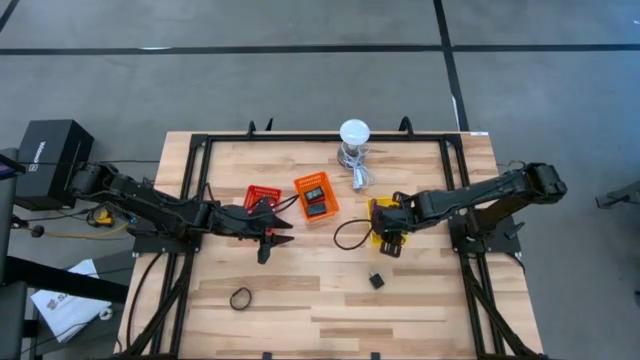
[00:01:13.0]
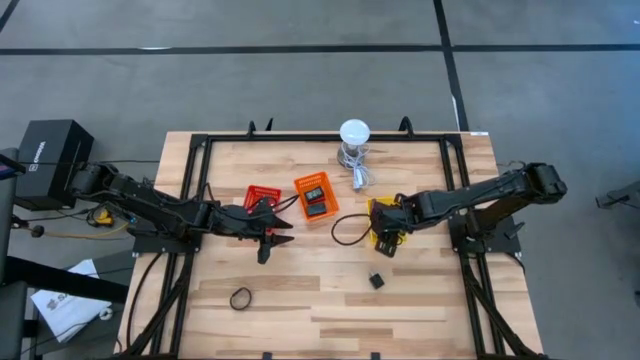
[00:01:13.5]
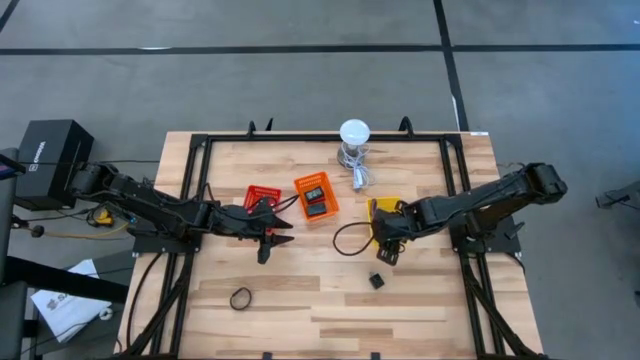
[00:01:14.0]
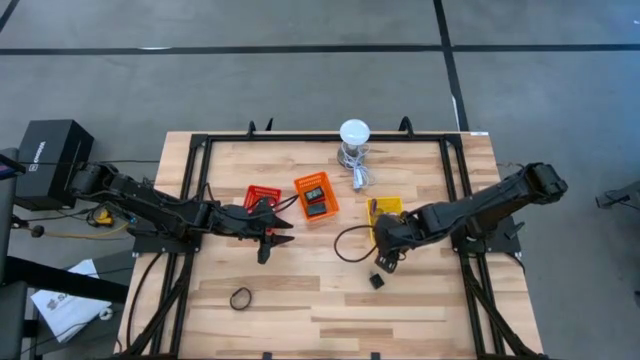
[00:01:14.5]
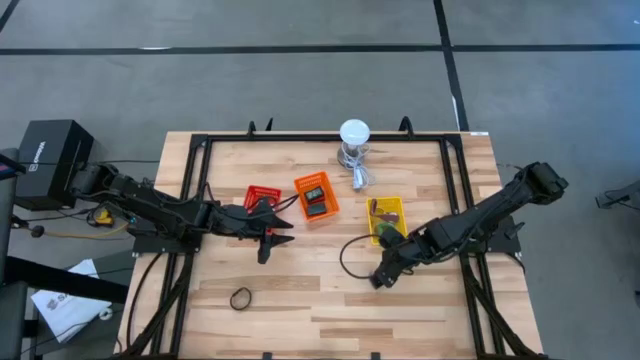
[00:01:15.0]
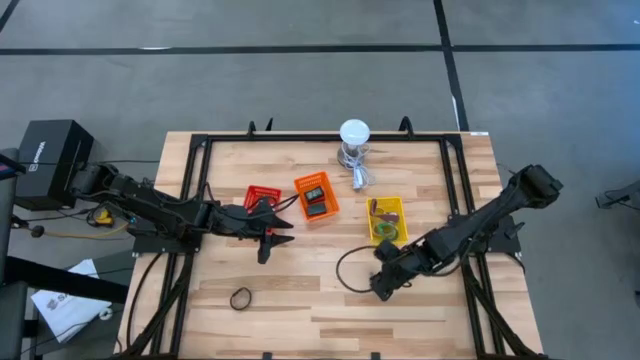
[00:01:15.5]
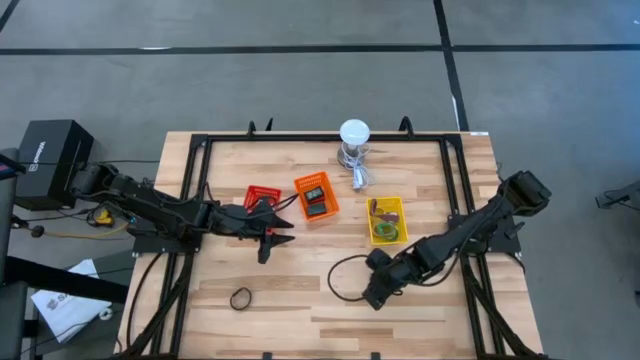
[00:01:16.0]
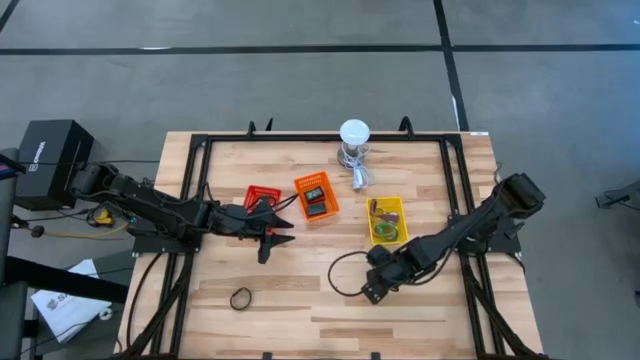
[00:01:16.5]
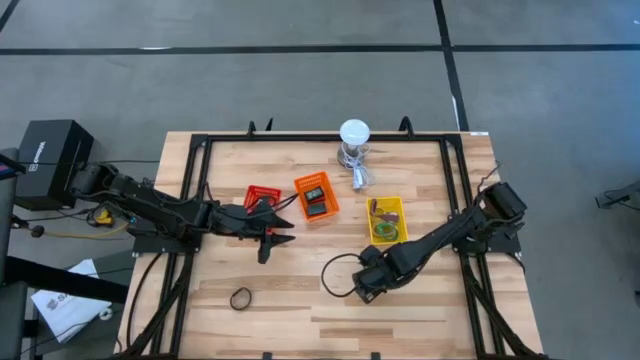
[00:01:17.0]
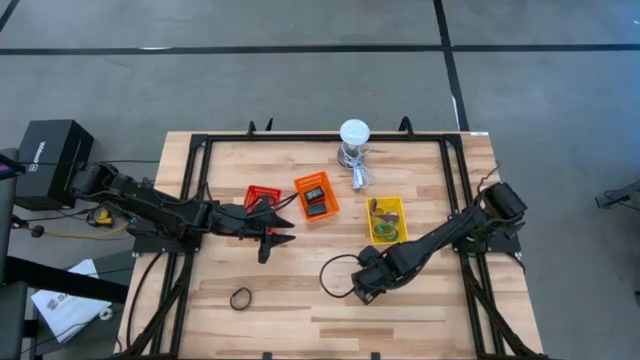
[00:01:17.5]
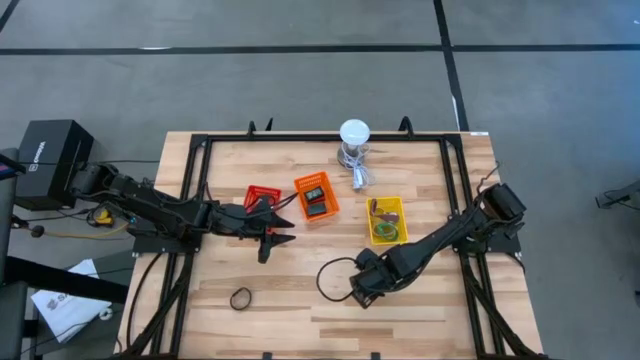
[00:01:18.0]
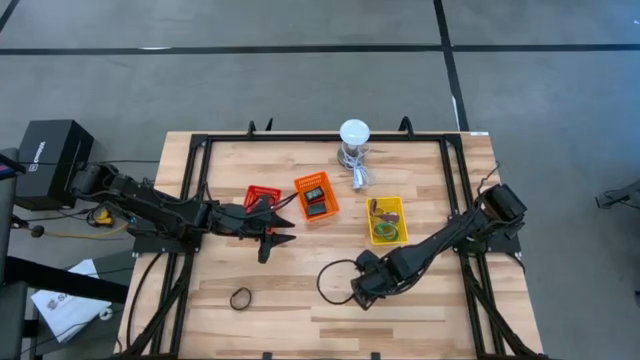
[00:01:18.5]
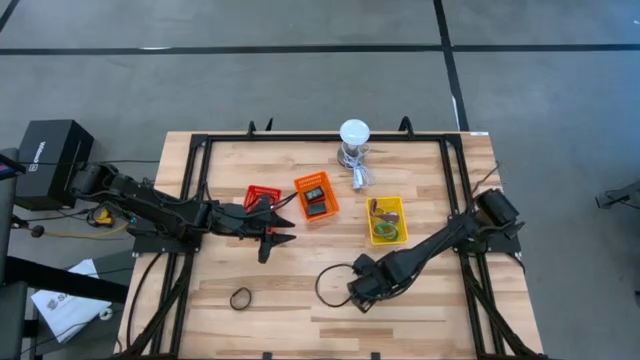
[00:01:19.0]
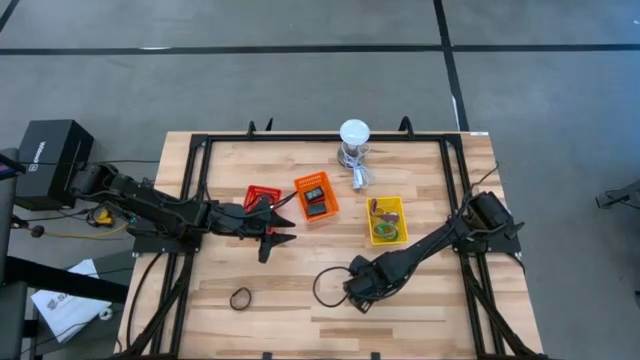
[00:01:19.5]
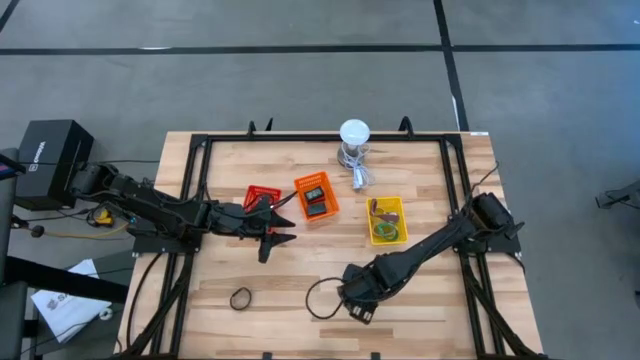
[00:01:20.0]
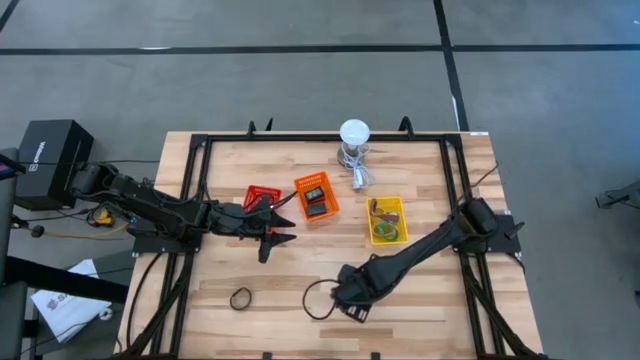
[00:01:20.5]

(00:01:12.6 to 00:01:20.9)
Task: Pick & Place Office items
Put the black charger adapter into the red bin

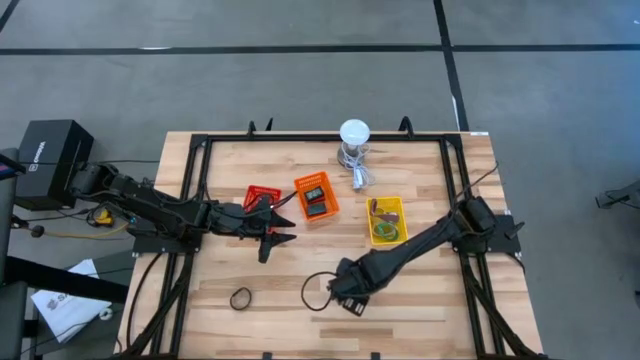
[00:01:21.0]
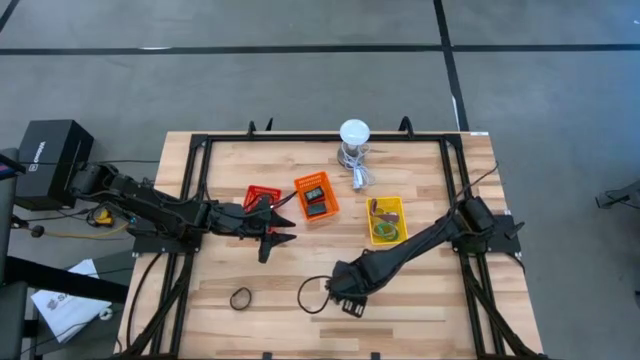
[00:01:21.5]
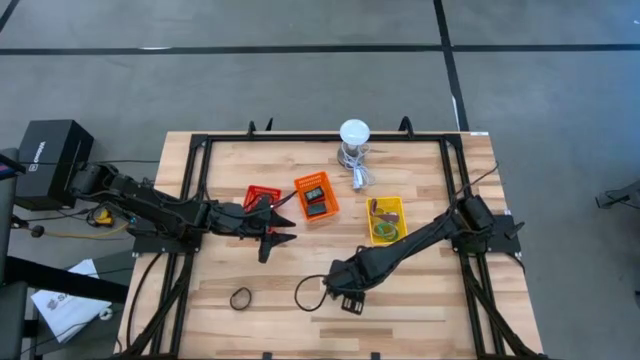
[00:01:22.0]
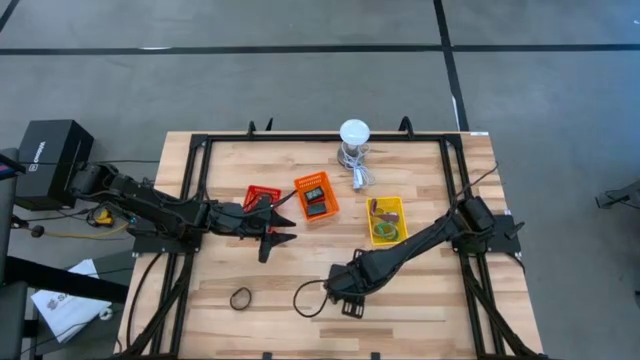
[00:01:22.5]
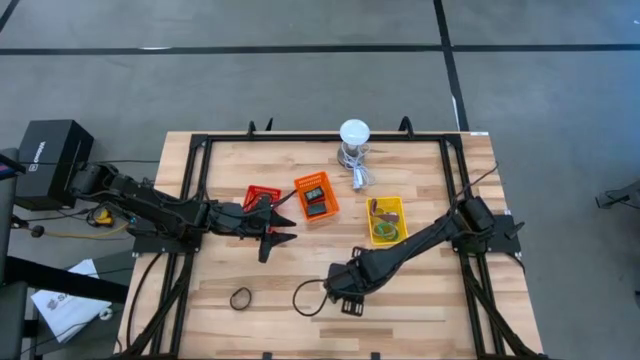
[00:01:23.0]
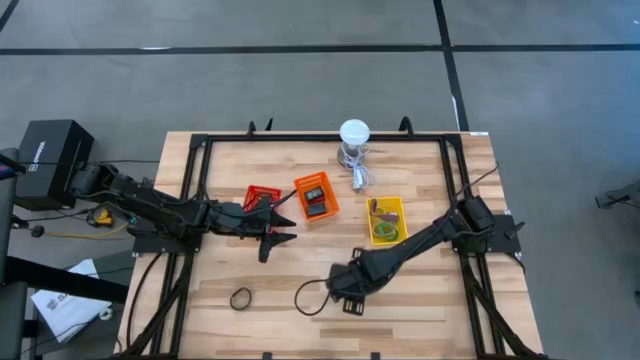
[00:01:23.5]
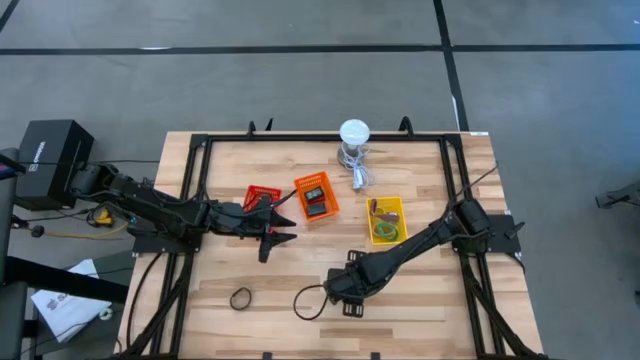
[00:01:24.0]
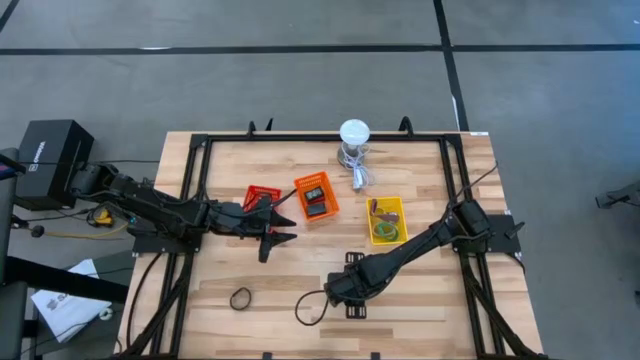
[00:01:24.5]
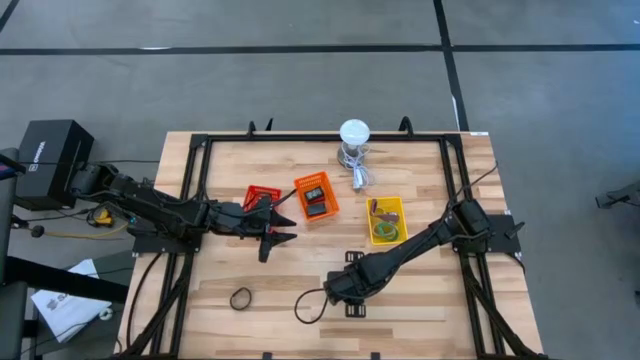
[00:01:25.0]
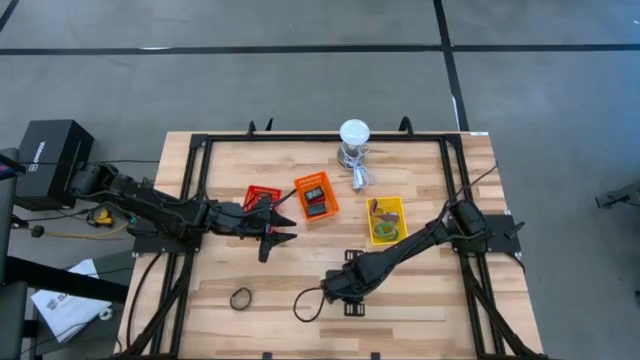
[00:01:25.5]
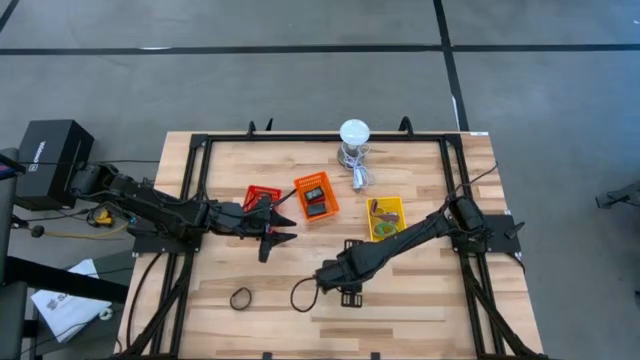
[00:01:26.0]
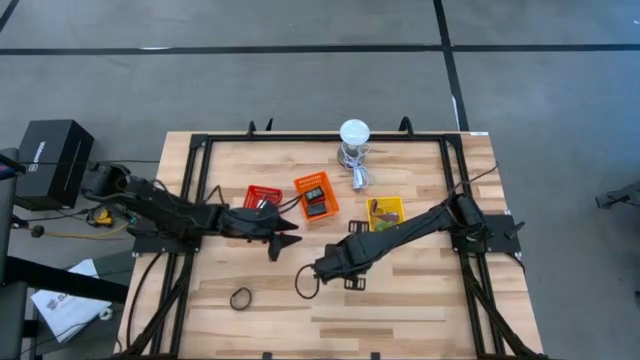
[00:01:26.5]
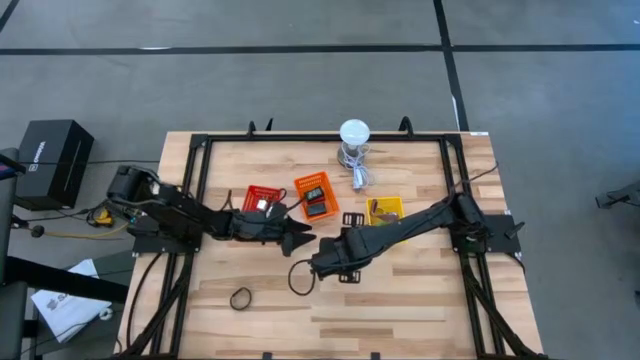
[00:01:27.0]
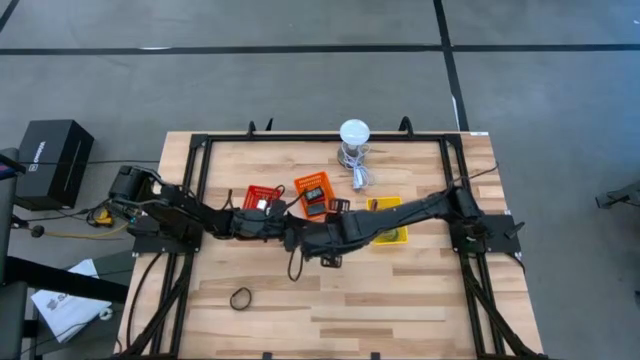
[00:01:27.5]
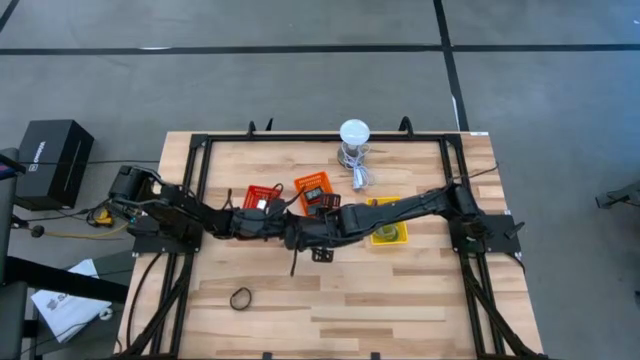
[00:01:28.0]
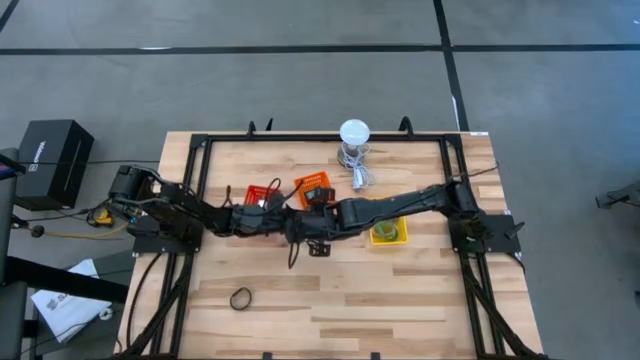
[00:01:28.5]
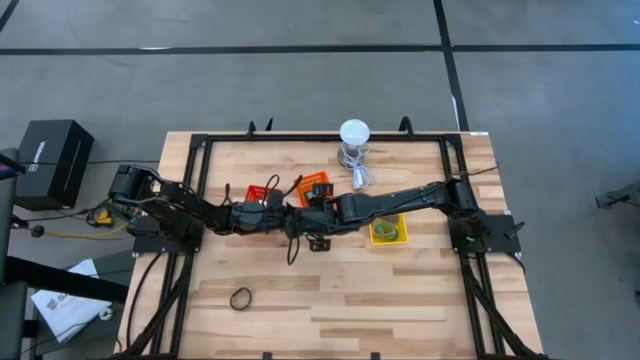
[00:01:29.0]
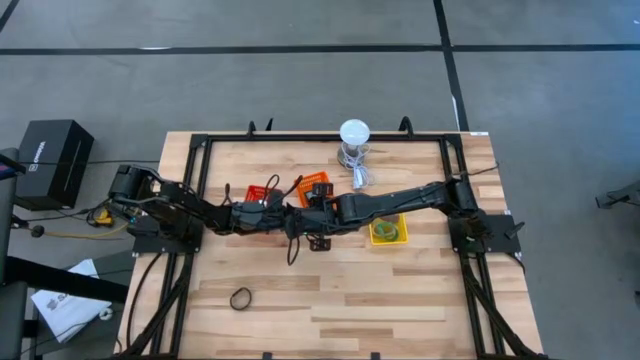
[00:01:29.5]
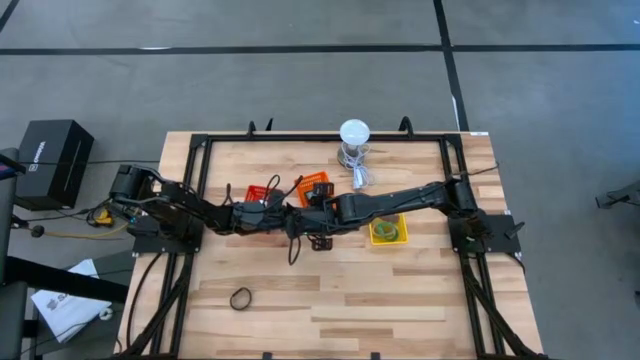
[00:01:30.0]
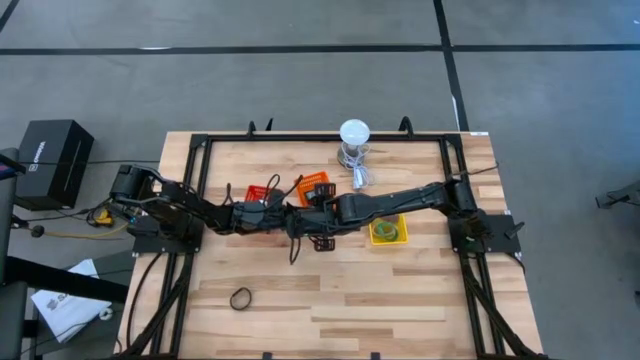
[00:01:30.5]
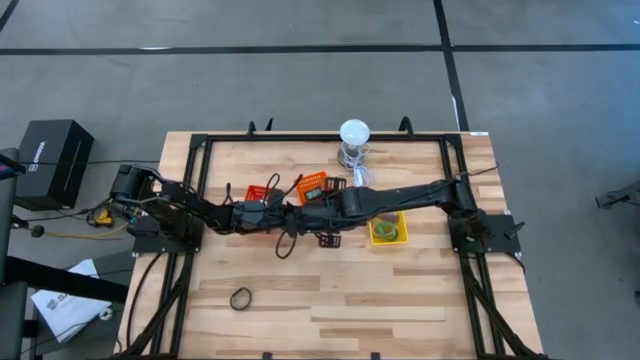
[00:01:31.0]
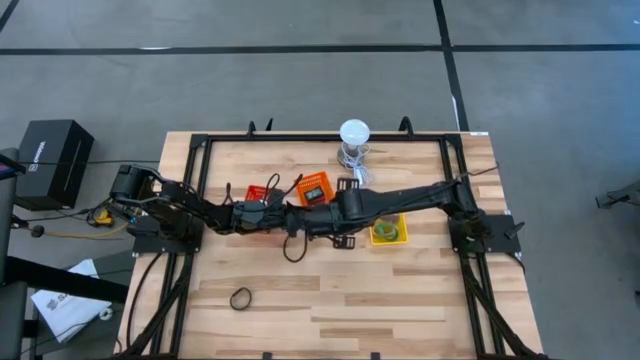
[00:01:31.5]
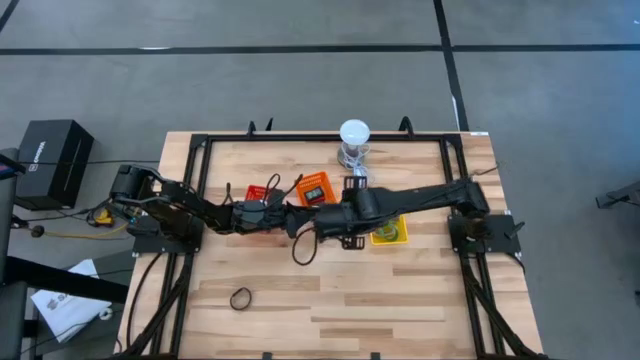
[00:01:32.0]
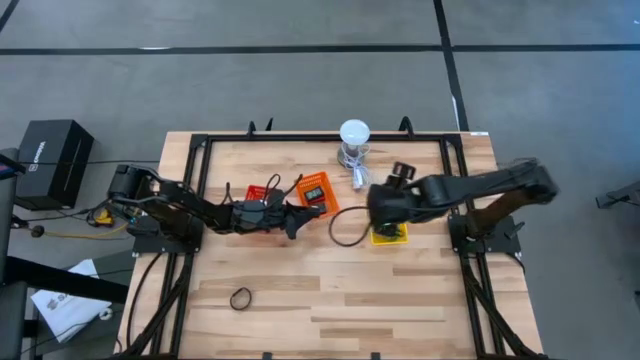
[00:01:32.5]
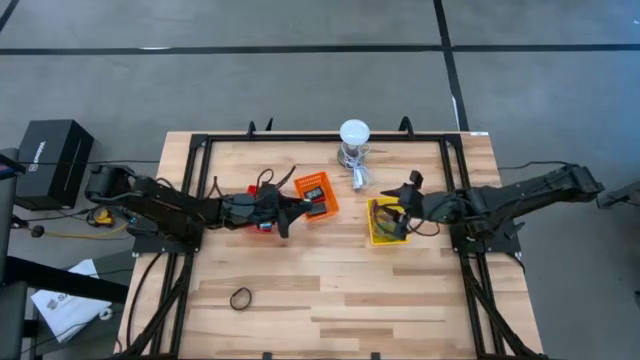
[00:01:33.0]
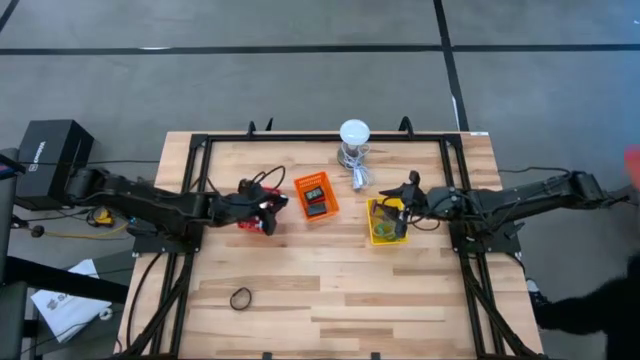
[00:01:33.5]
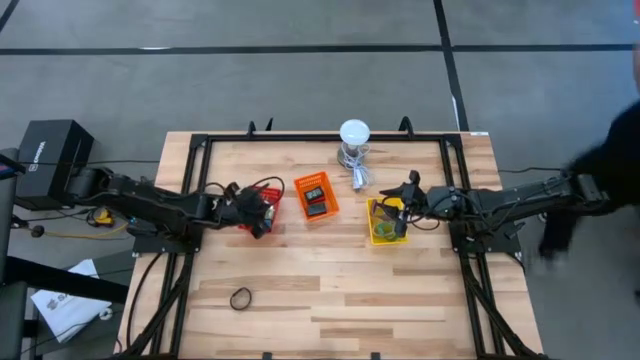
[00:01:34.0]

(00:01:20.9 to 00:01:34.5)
Put the black charger adapter into the red bin
